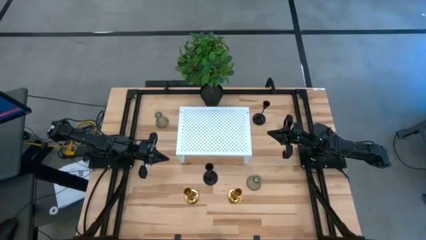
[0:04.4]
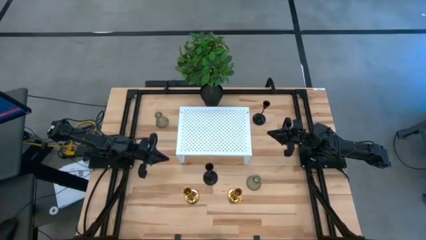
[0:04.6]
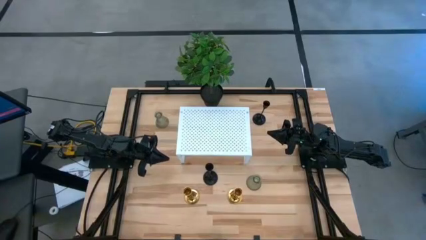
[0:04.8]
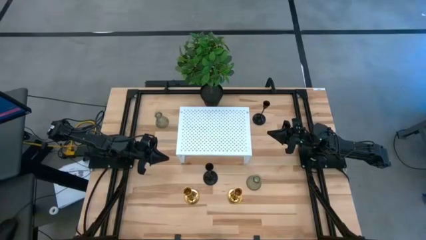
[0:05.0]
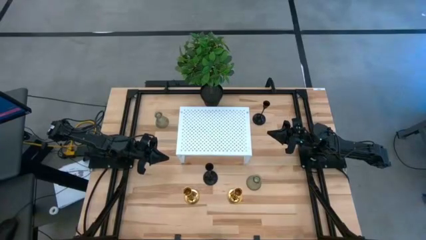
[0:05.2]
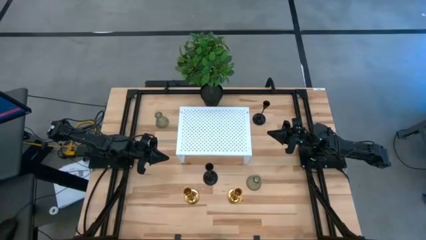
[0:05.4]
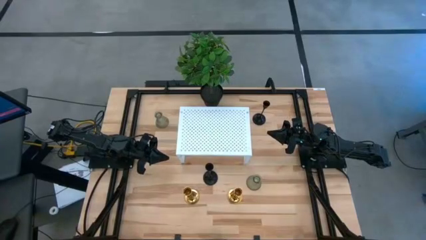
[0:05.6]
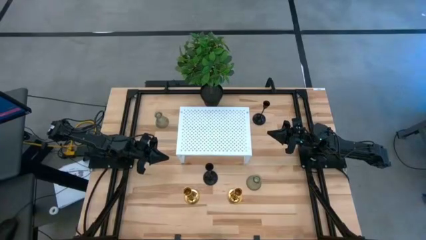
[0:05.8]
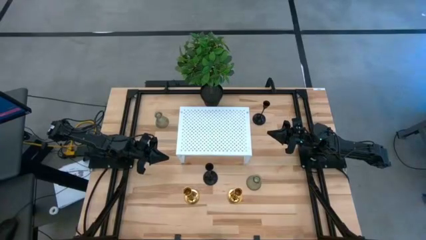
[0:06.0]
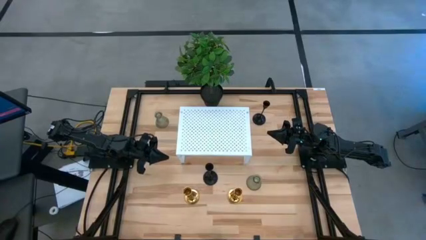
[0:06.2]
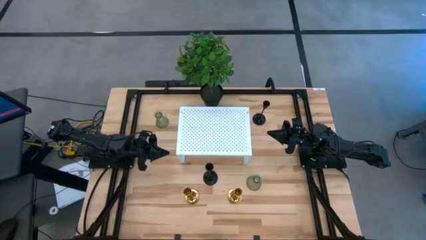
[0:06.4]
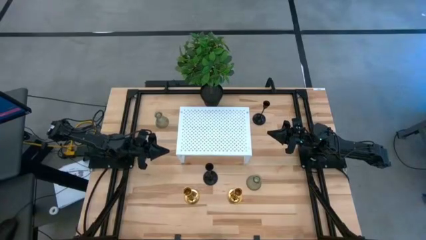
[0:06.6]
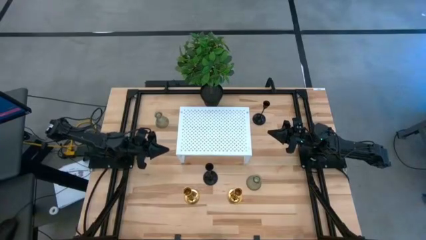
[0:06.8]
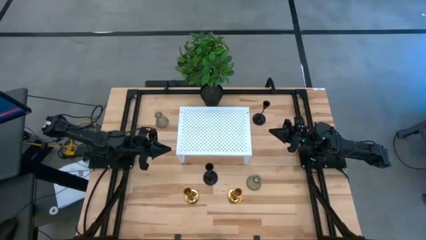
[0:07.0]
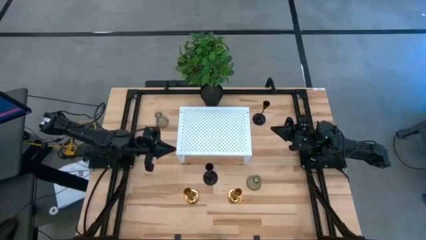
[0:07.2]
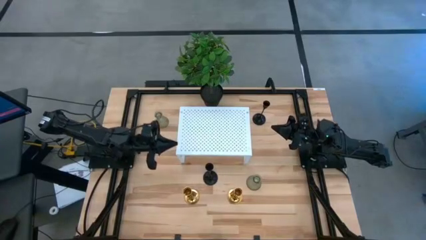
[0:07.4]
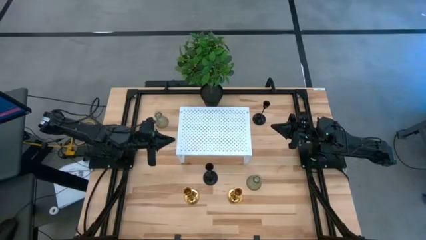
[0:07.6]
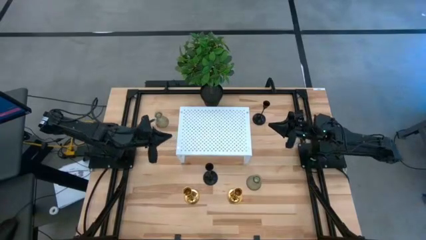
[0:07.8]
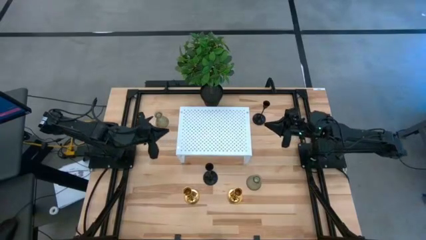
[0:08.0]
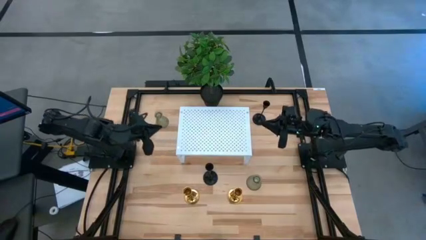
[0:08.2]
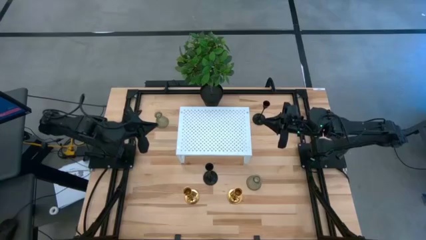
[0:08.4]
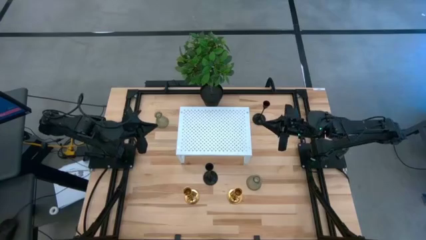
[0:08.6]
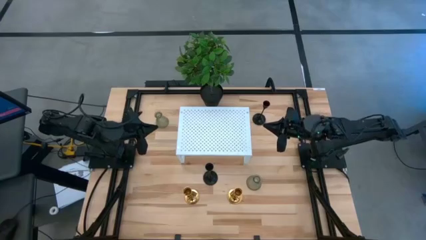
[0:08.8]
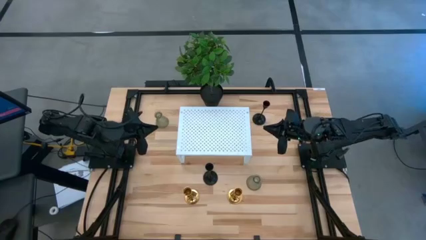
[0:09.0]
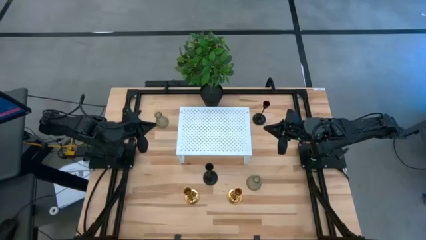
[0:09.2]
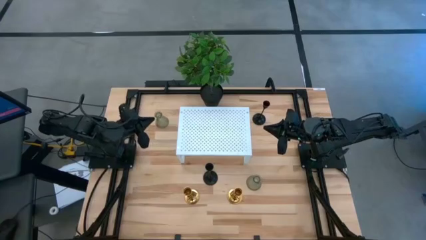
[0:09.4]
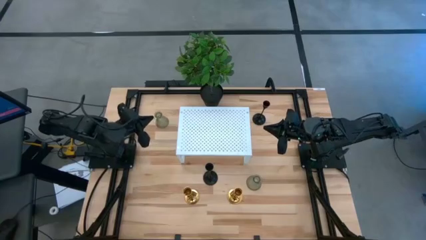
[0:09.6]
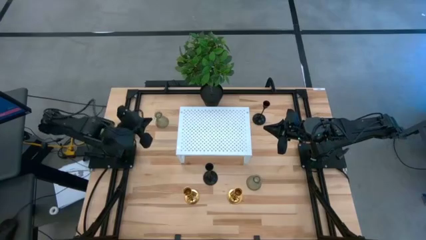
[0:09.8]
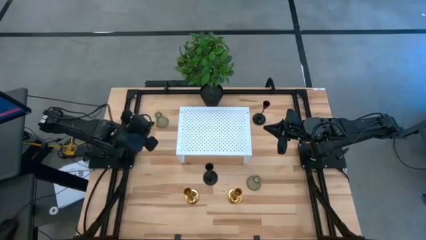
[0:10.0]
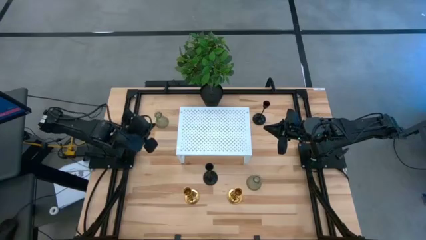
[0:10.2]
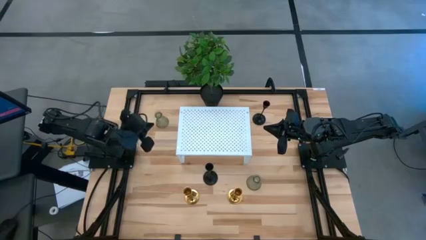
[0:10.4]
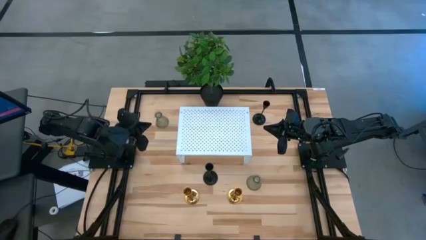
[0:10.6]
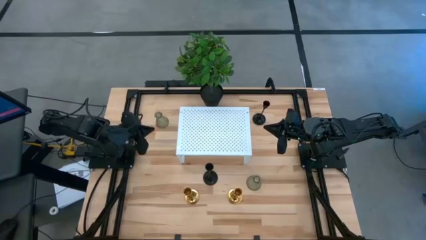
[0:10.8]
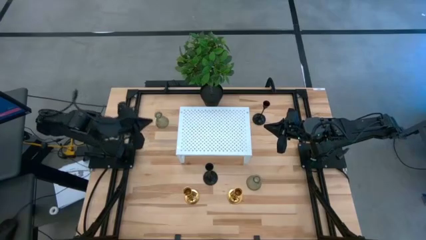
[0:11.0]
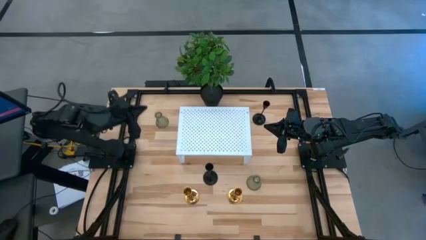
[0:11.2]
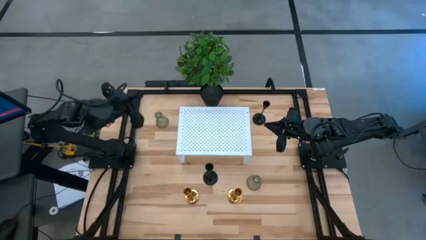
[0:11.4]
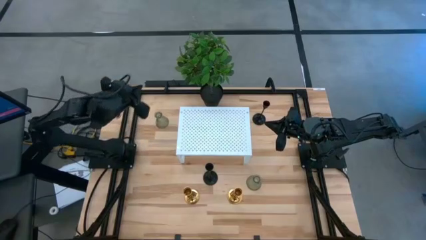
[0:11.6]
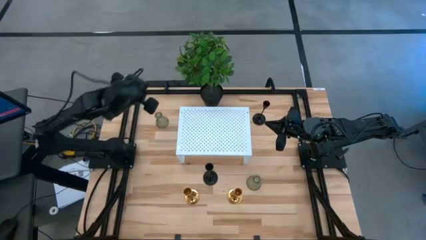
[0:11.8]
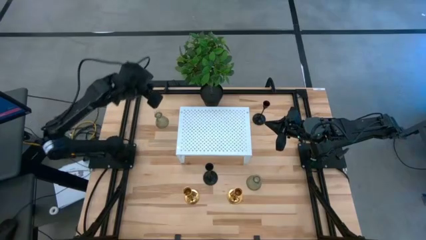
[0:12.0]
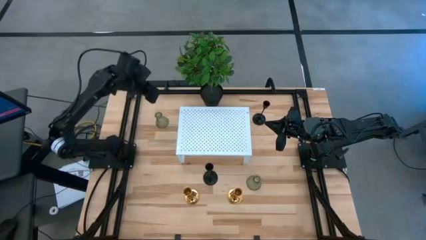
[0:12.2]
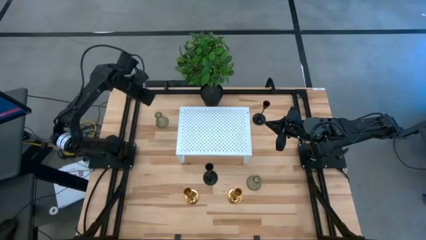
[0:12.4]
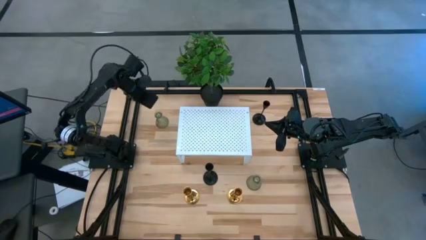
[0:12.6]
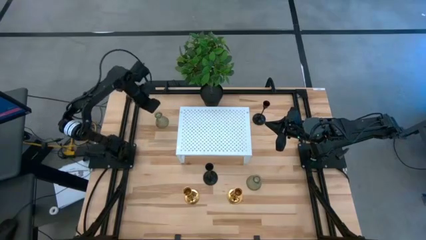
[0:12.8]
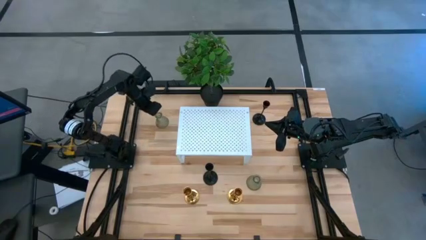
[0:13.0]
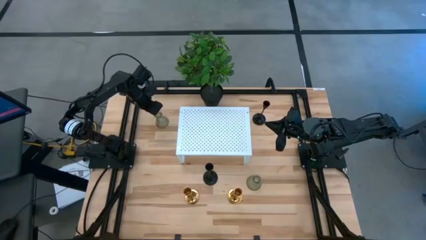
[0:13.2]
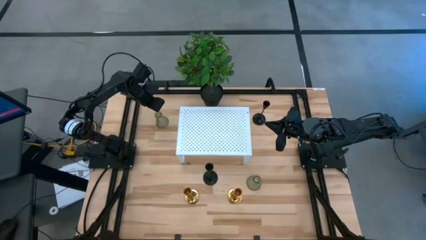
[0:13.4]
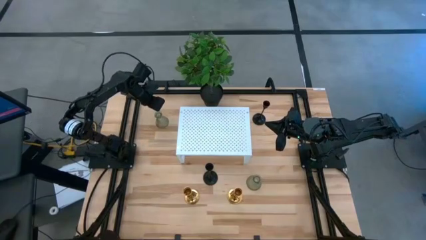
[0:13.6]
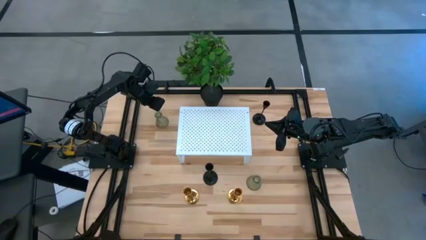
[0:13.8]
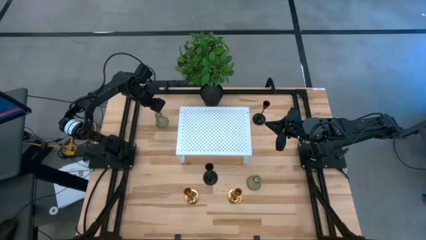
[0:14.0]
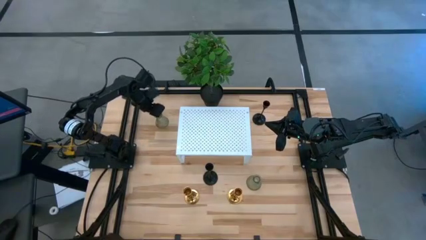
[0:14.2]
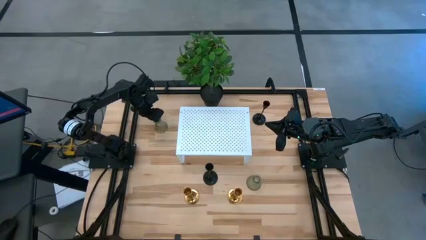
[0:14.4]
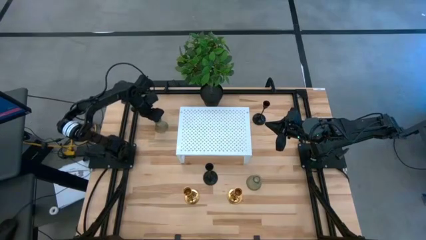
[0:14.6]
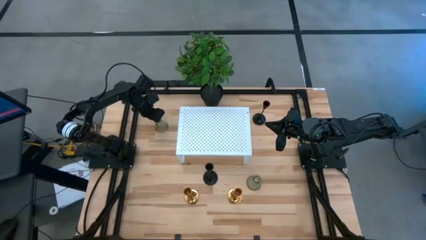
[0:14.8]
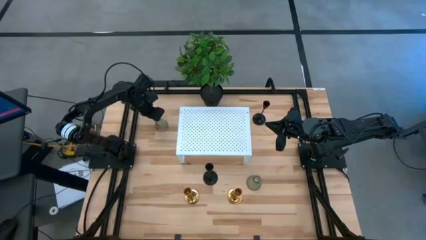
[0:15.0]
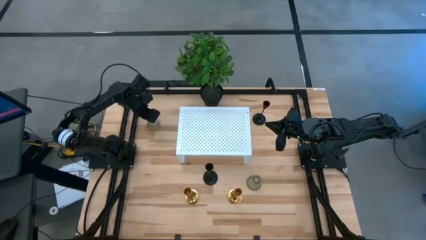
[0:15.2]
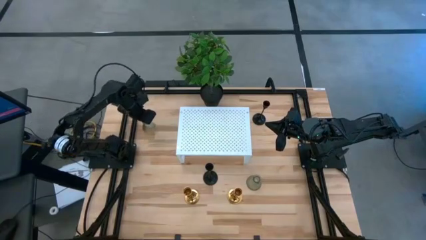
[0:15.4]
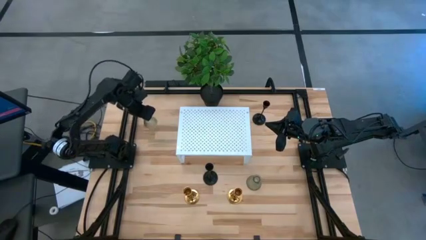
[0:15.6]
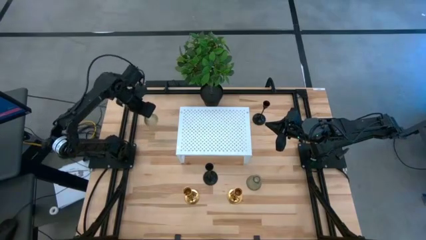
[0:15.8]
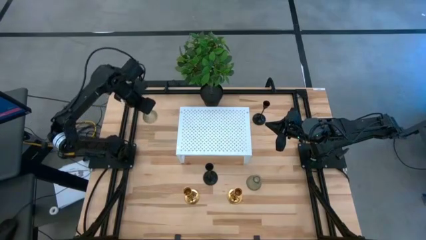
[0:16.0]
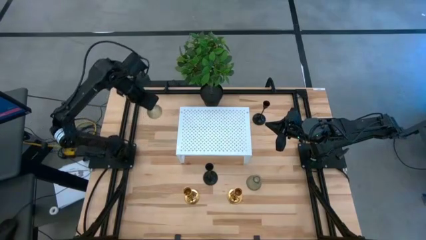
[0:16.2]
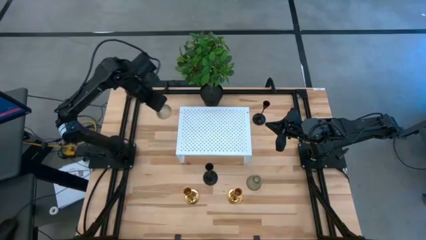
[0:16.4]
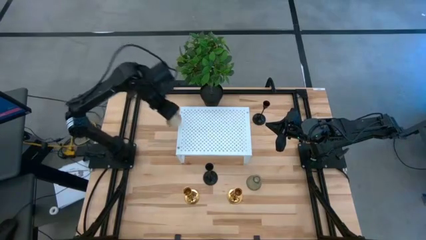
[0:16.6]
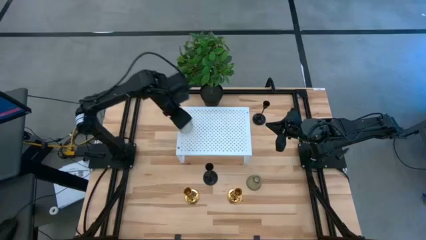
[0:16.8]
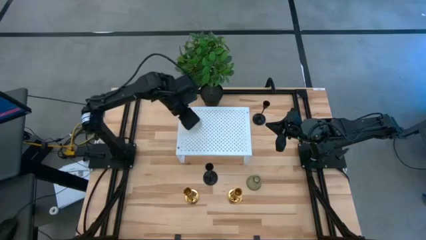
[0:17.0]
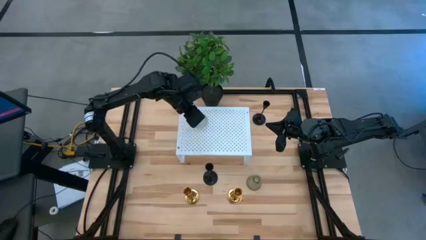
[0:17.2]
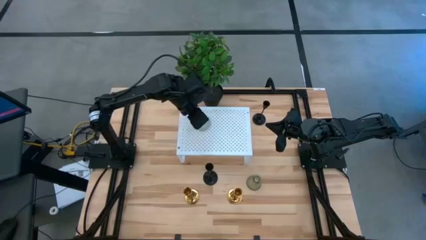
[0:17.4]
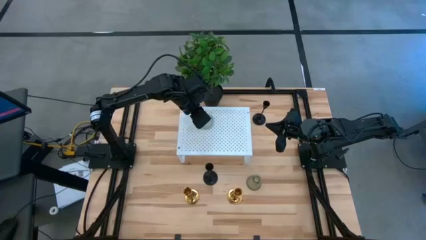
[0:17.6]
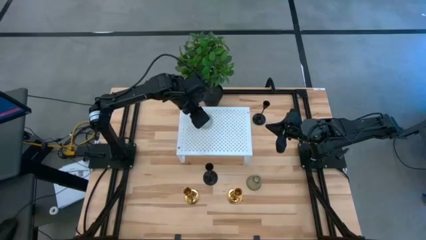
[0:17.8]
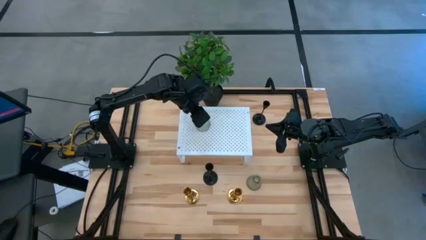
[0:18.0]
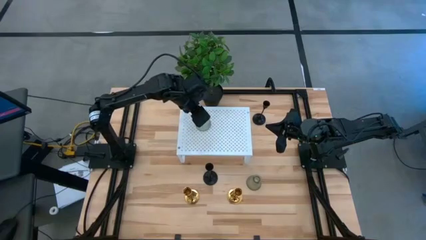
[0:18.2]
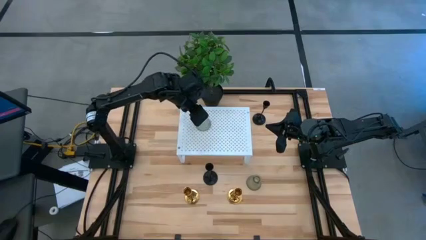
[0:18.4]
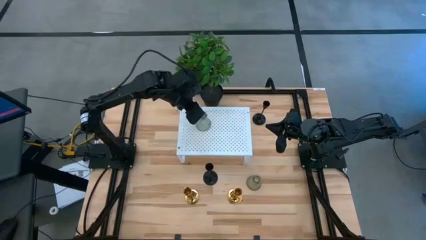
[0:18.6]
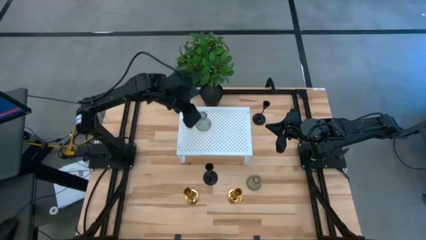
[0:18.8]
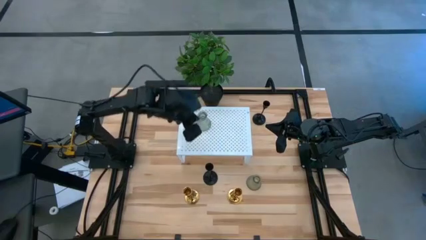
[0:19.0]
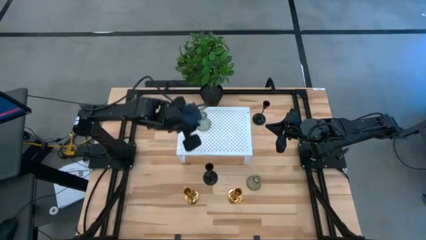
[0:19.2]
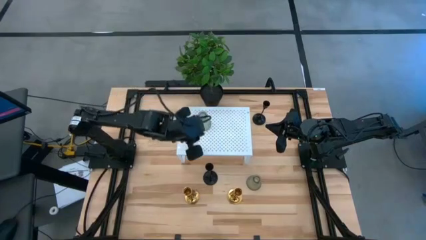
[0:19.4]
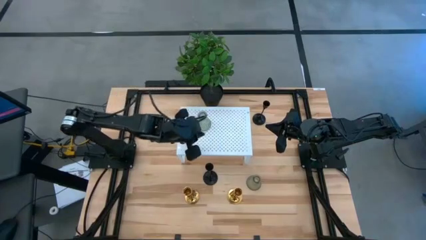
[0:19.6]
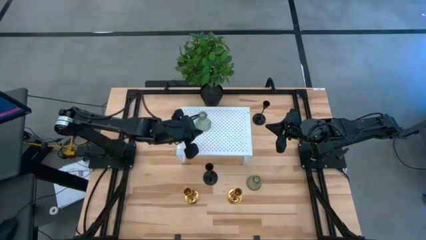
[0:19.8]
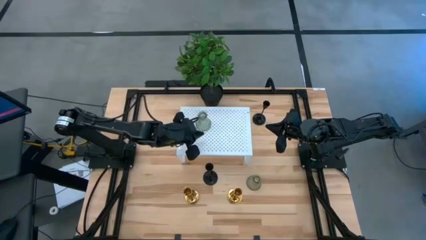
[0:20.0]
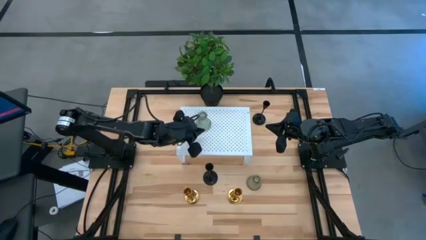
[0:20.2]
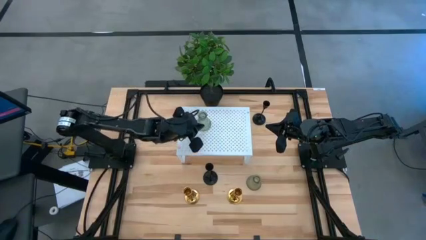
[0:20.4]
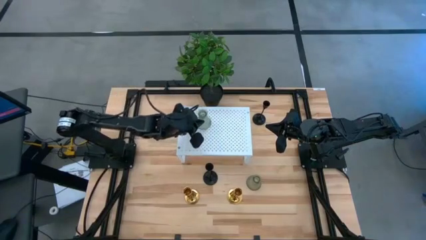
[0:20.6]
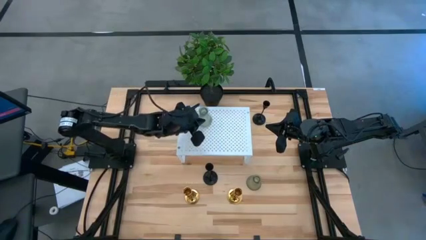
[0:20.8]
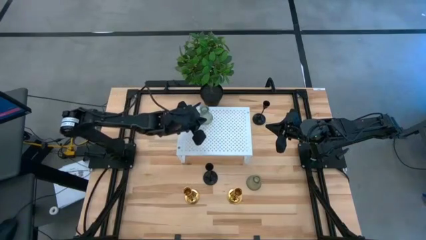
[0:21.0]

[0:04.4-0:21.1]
Task: Pick & Place candle stick holders
Put the left green candle holder on the shelf
